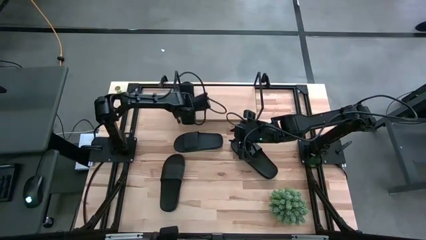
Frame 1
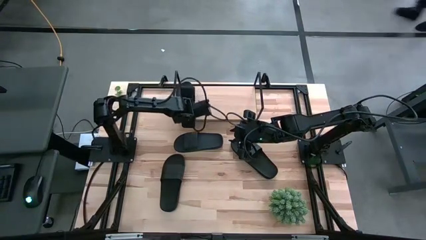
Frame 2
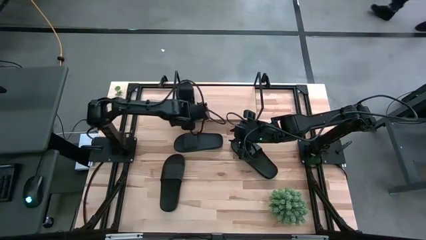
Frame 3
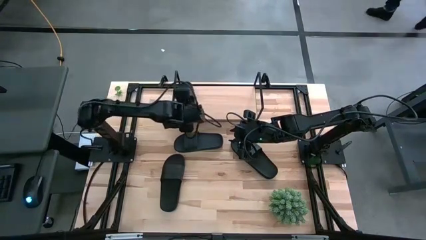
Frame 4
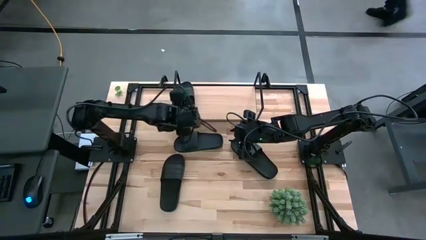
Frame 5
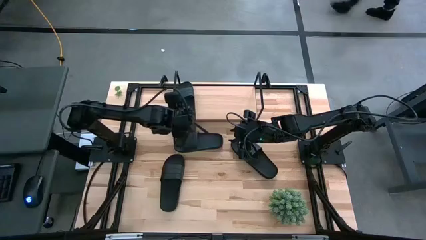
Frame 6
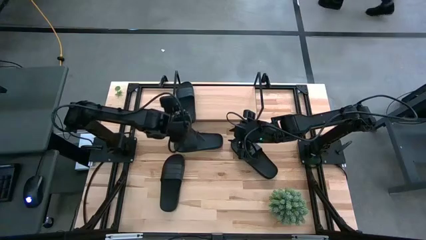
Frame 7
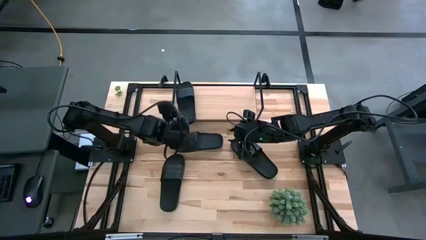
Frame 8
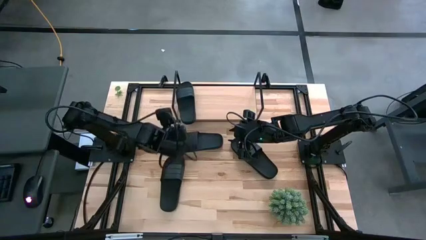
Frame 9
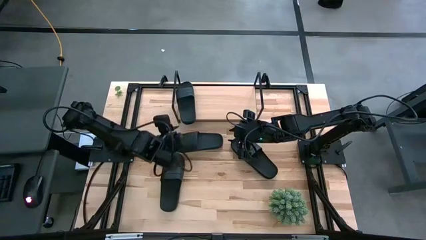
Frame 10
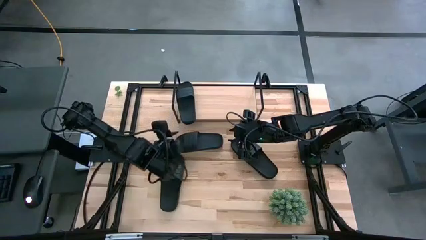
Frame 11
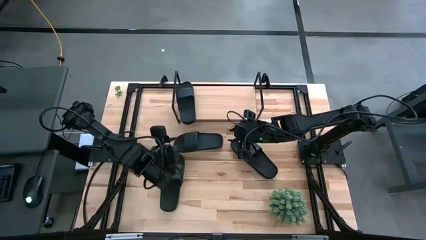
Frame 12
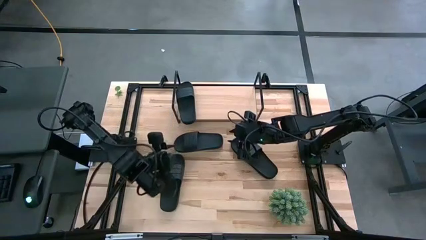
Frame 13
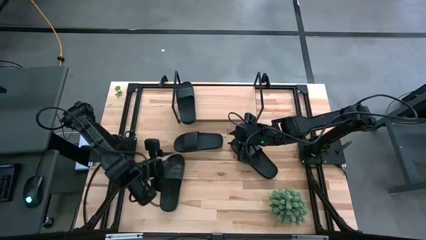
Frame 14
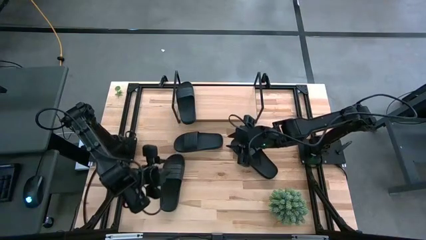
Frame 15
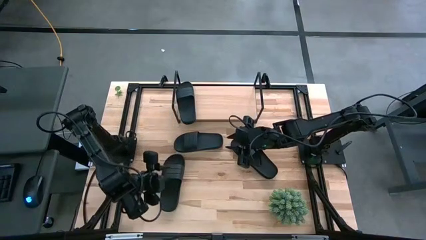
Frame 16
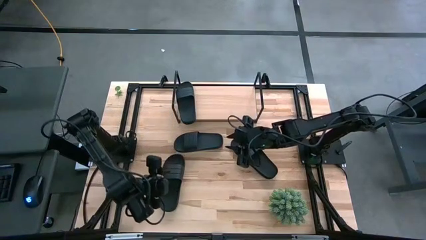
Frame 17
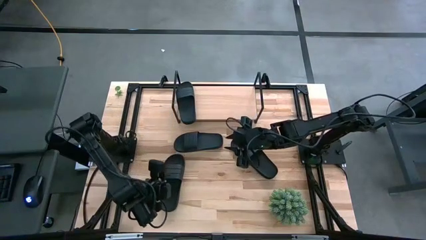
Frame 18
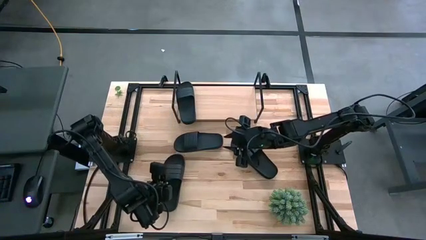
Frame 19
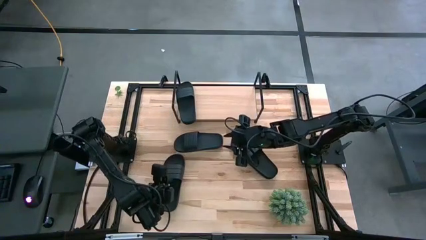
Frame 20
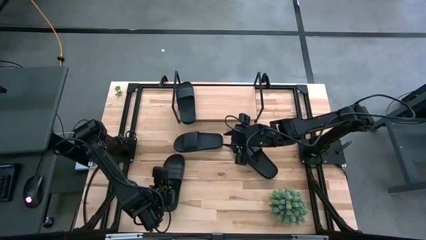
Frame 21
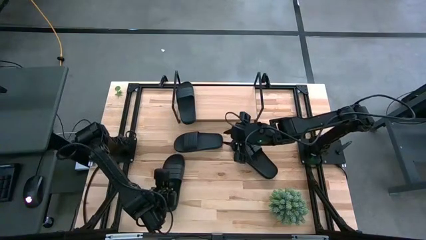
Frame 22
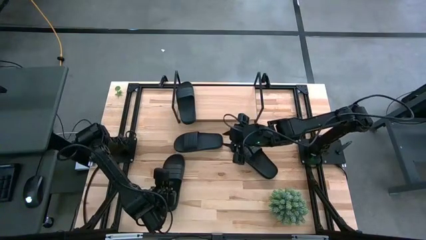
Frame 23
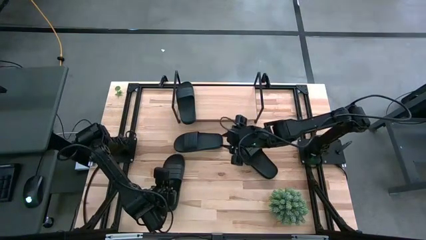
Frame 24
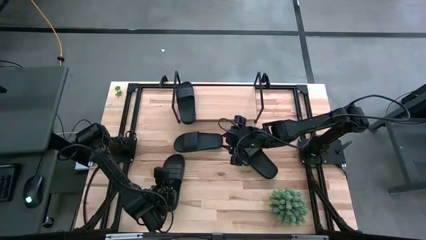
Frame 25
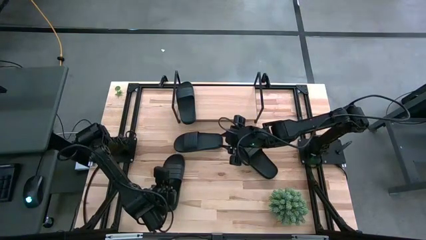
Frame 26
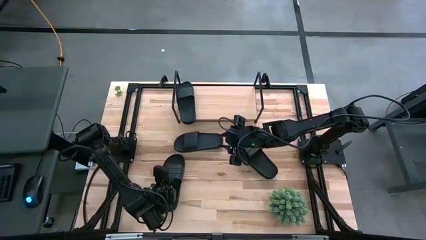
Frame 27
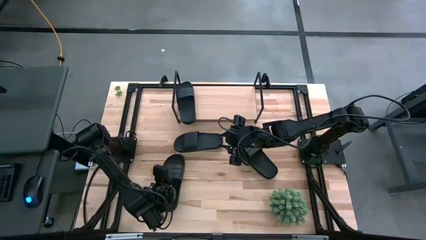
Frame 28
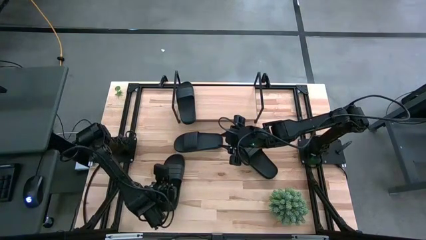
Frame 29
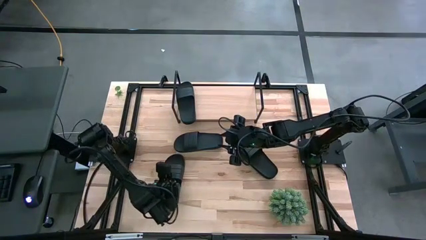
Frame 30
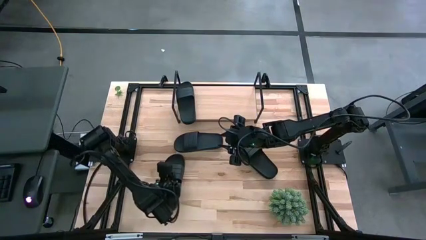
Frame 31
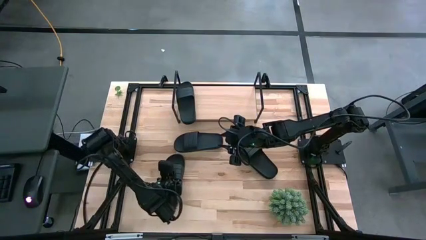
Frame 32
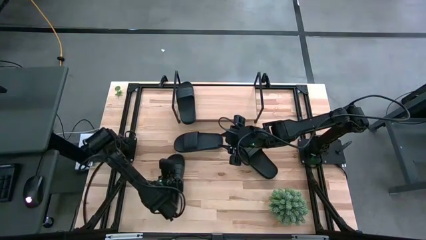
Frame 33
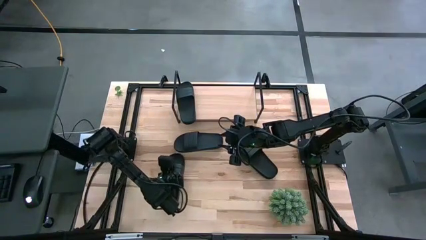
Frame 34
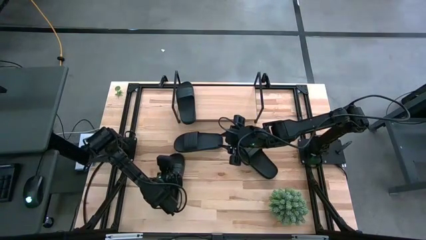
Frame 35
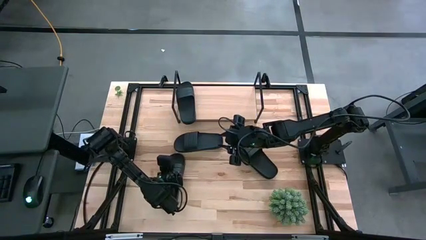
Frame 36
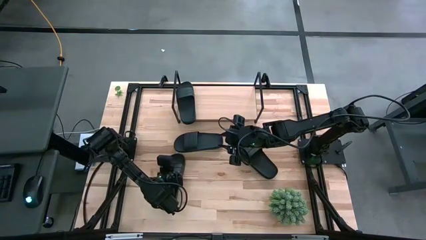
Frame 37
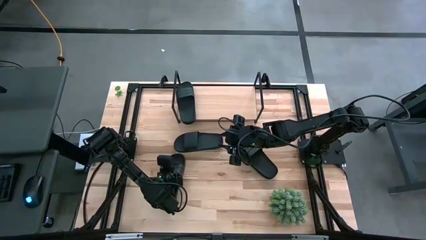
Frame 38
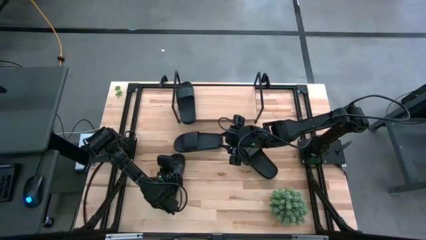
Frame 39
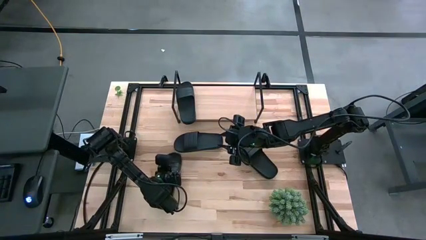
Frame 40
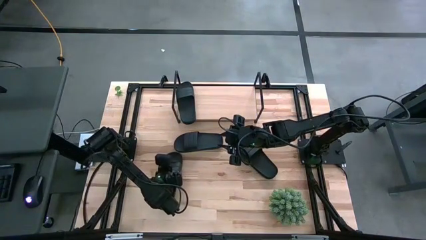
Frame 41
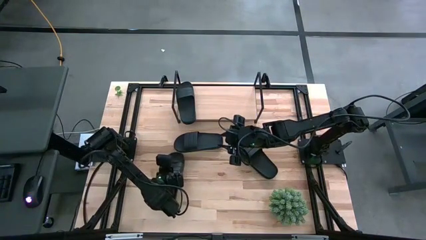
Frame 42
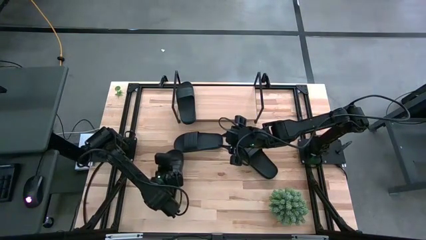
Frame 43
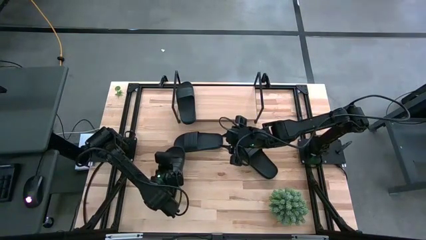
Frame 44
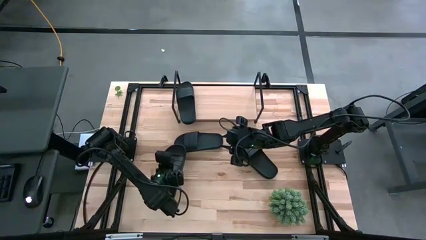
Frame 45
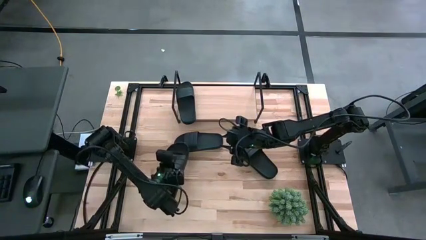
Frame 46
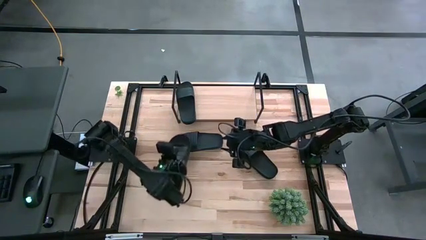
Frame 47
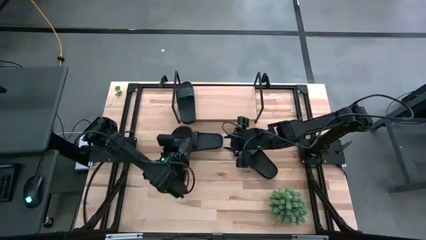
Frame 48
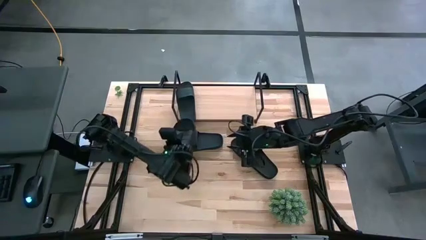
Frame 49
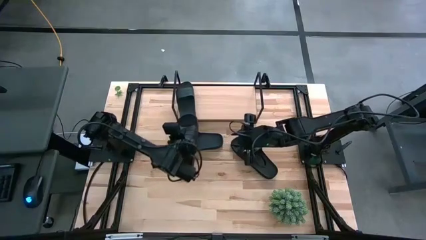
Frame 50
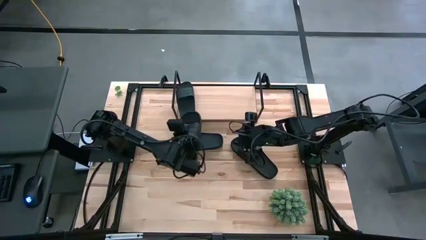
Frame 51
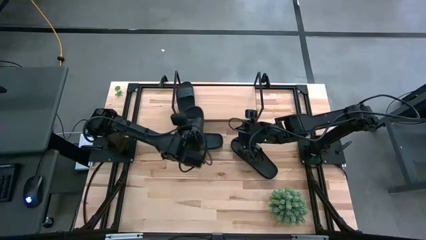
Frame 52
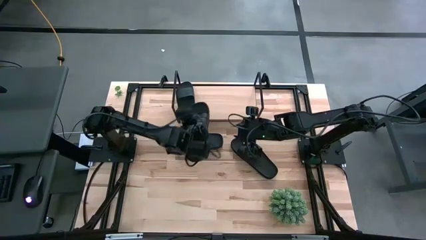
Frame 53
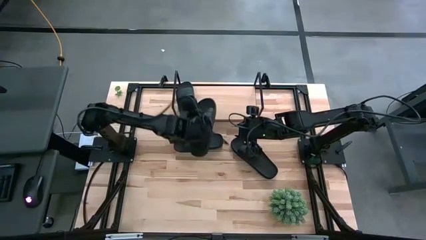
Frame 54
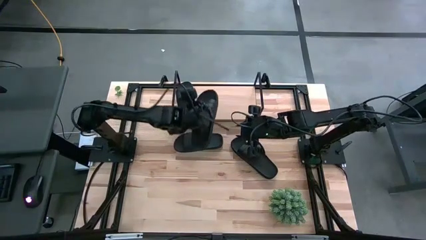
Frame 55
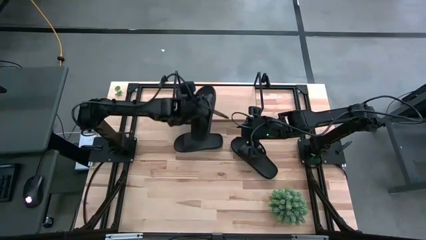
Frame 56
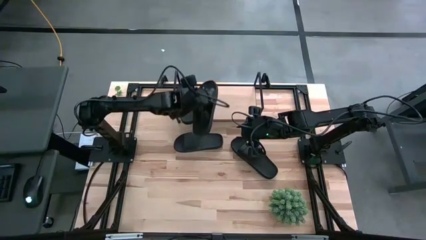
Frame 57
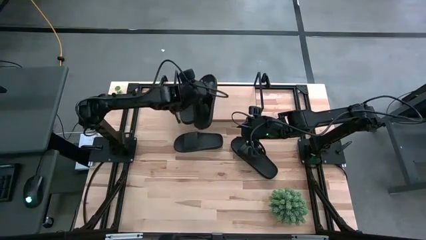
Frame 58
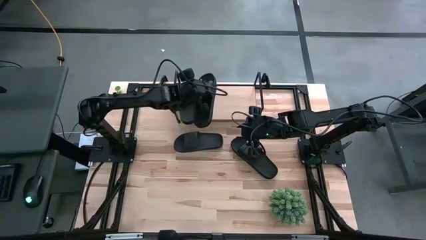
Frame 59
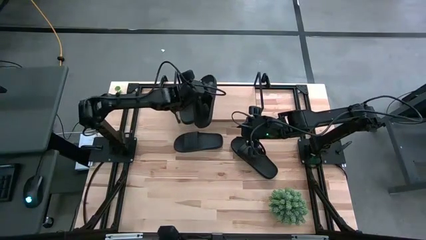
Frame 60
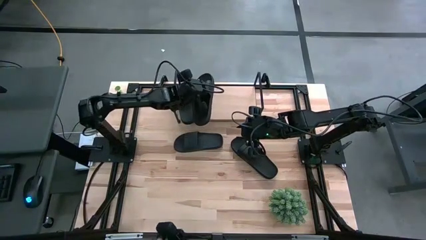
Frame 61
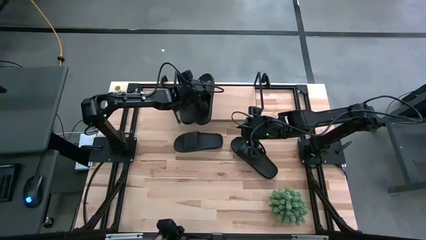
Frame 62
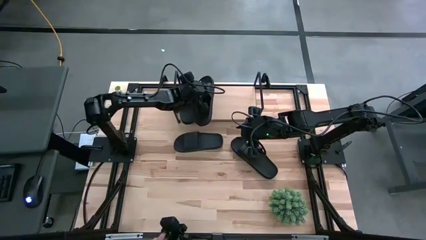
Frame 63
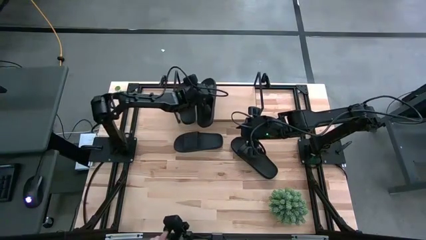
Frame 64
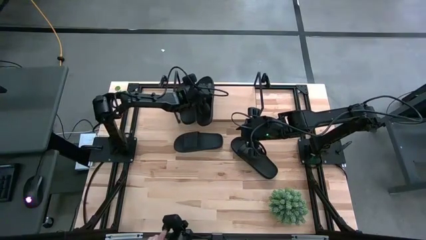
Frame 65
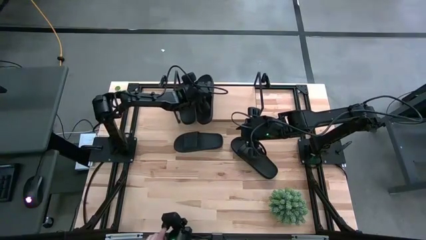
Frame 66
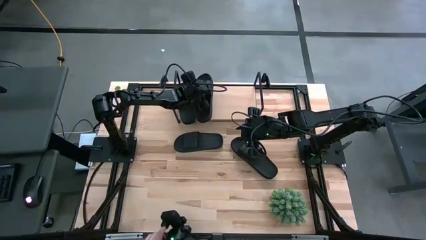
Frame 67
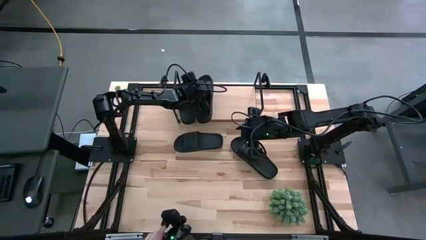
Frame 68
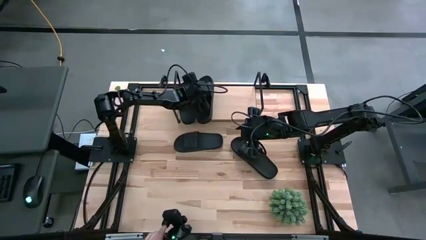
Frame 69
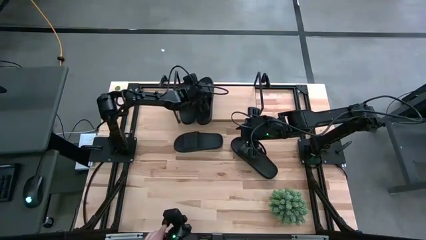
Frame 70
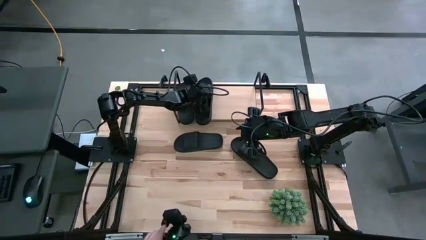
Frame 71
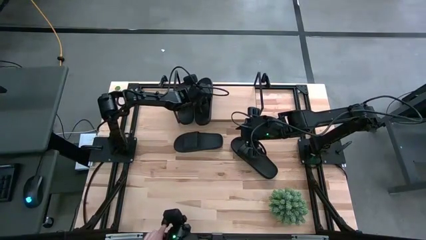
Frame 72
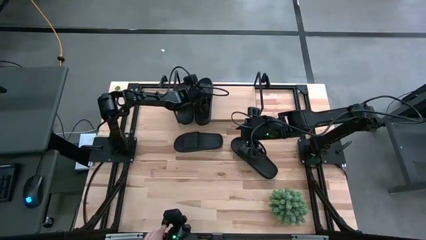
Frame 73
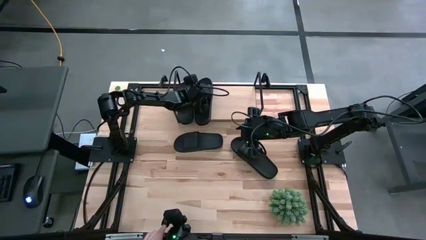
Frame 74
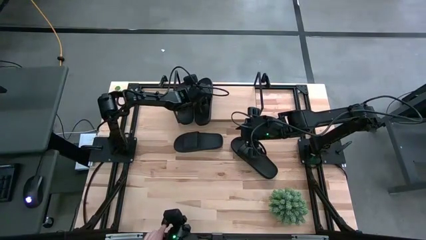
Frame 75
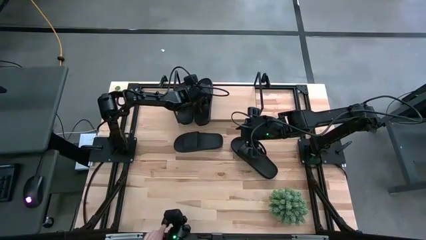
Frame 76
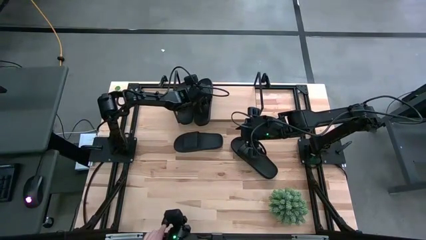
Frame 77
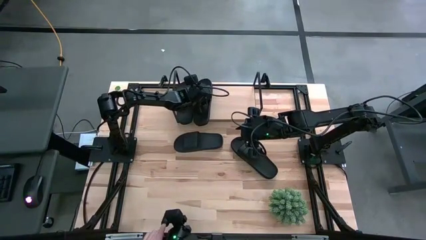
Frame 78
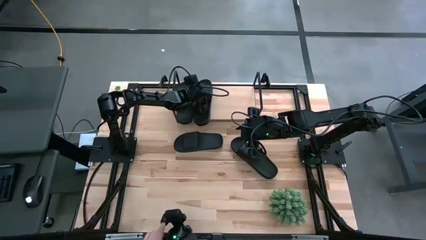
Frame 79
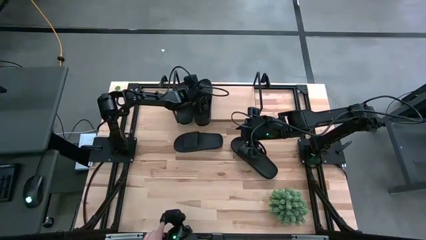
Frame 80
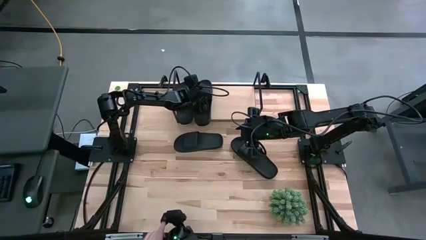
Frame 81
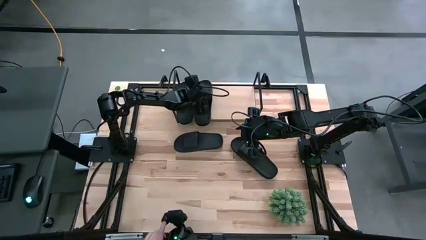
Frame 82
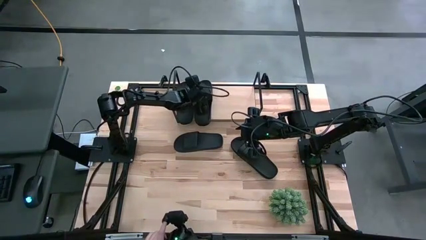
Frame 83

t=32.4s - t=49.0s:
Task: Pick and place slides into the shelf
Put the black slipper on the shelf
